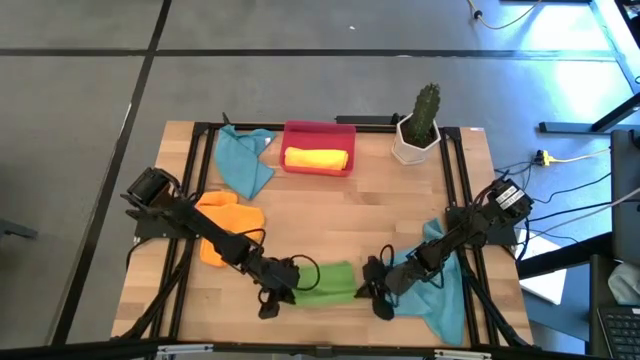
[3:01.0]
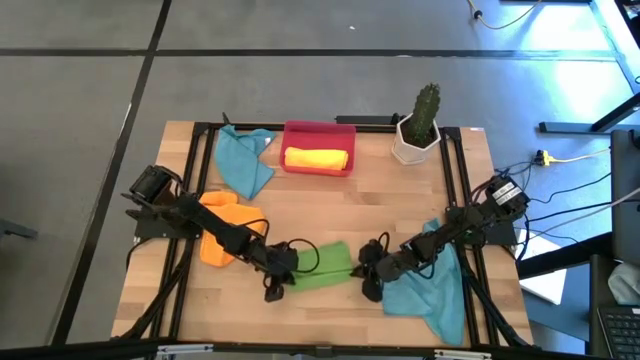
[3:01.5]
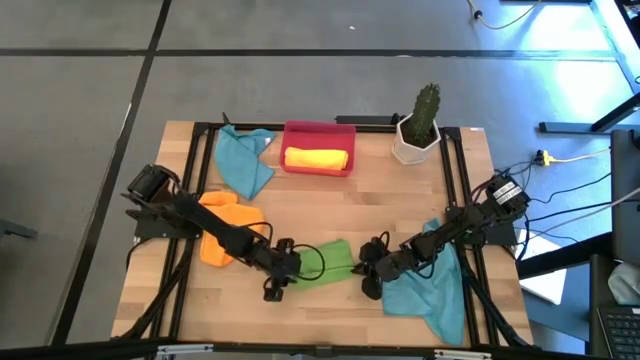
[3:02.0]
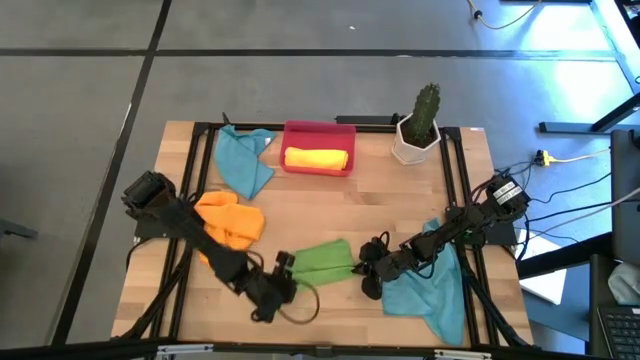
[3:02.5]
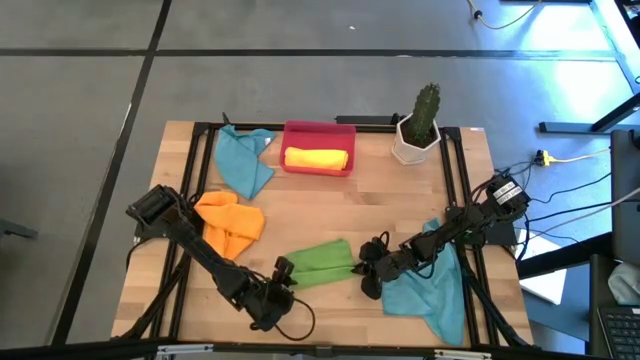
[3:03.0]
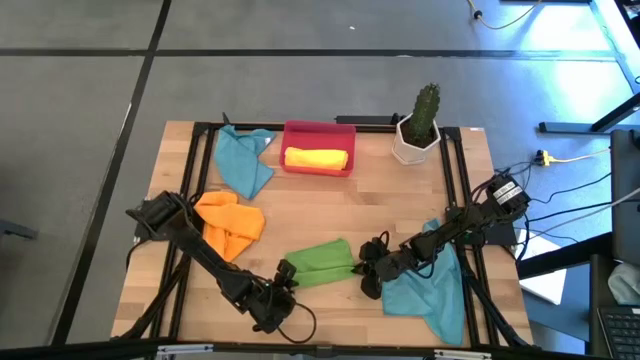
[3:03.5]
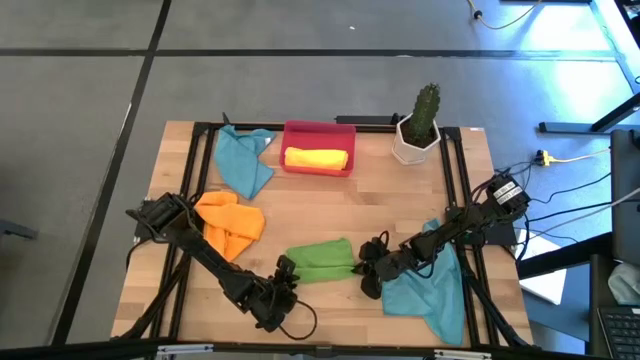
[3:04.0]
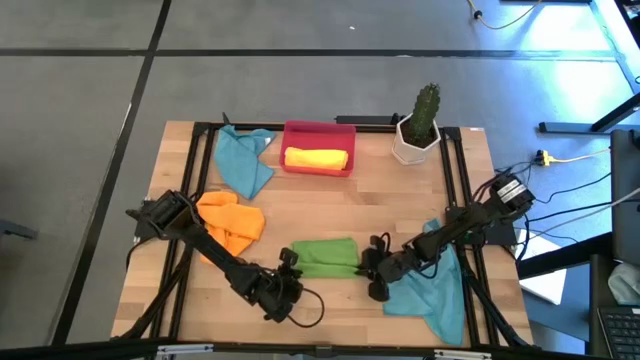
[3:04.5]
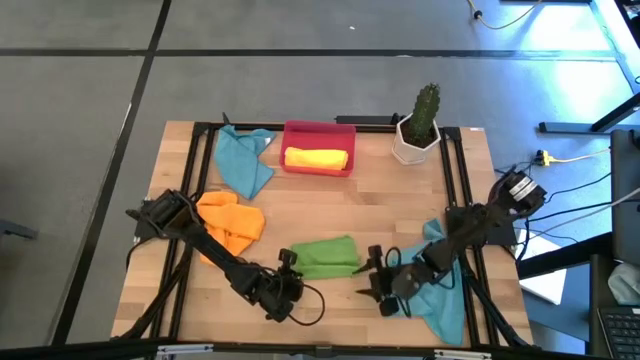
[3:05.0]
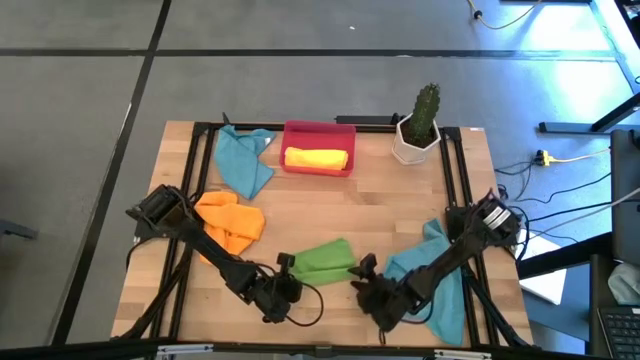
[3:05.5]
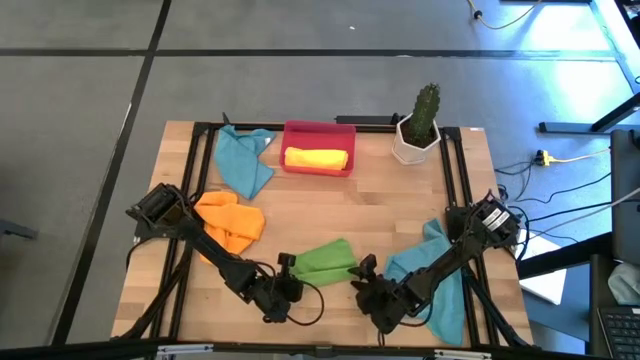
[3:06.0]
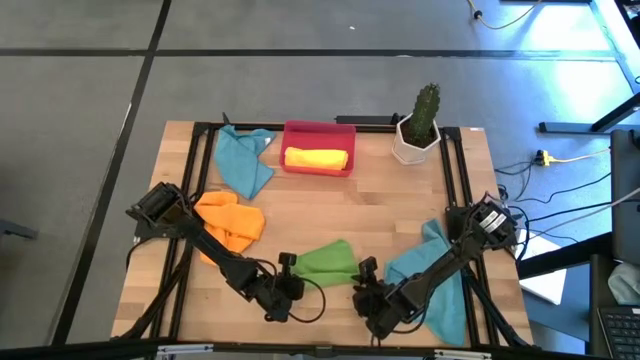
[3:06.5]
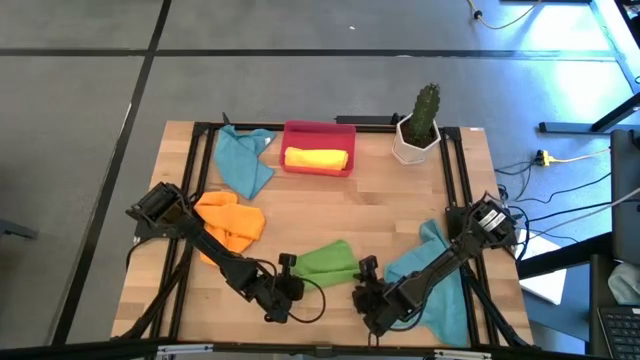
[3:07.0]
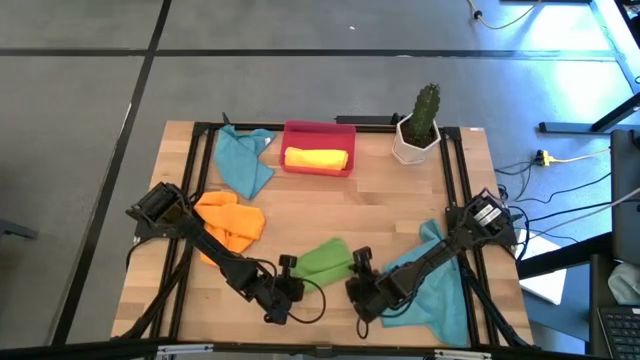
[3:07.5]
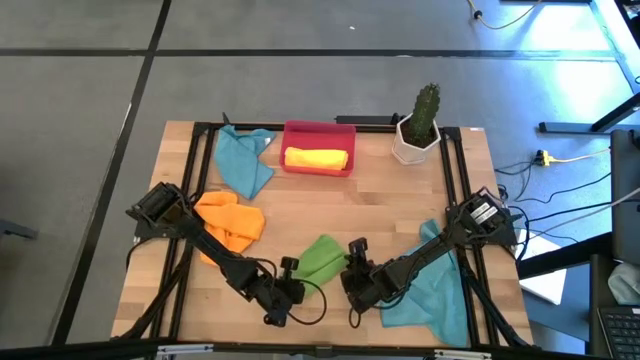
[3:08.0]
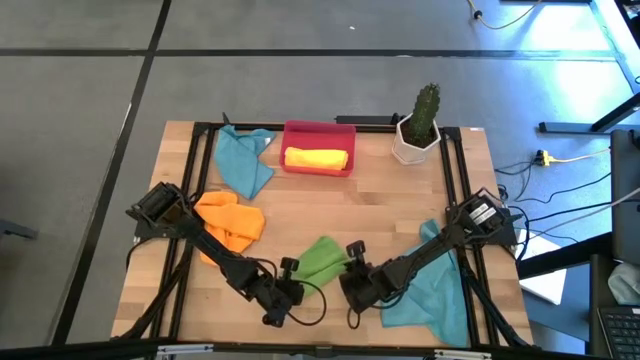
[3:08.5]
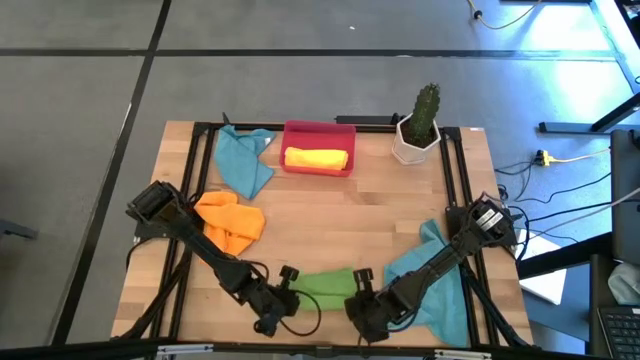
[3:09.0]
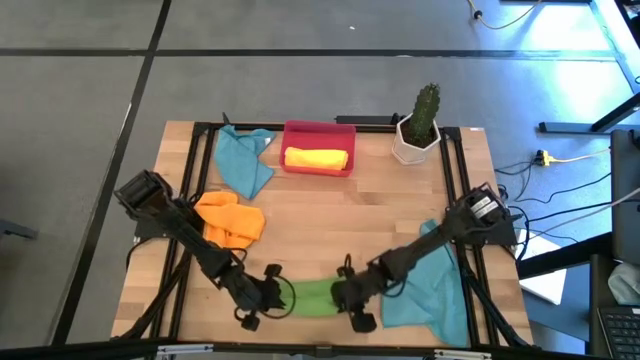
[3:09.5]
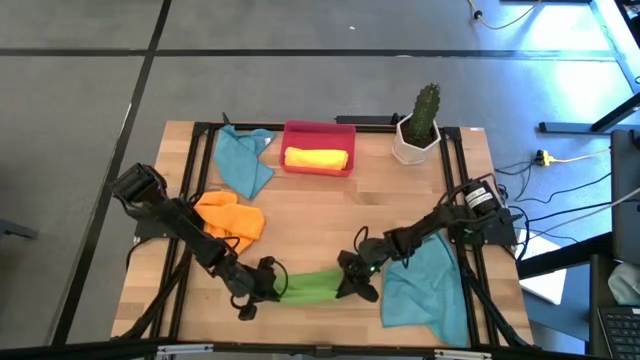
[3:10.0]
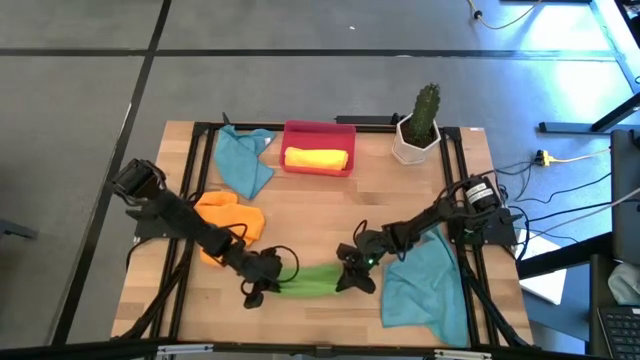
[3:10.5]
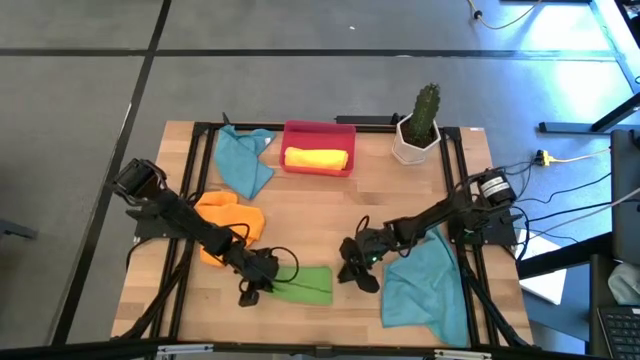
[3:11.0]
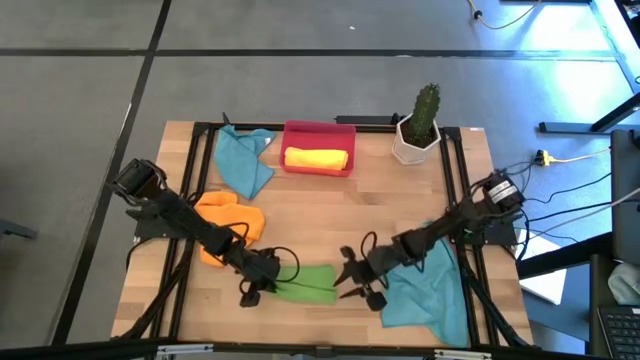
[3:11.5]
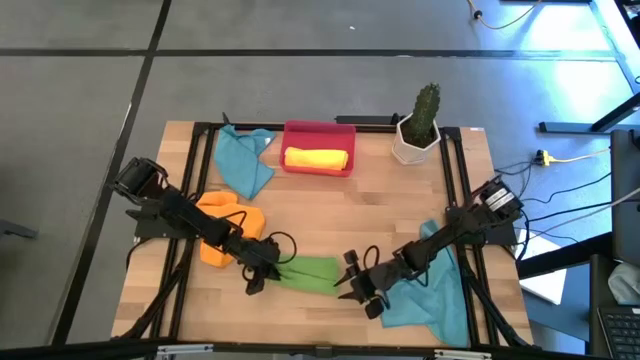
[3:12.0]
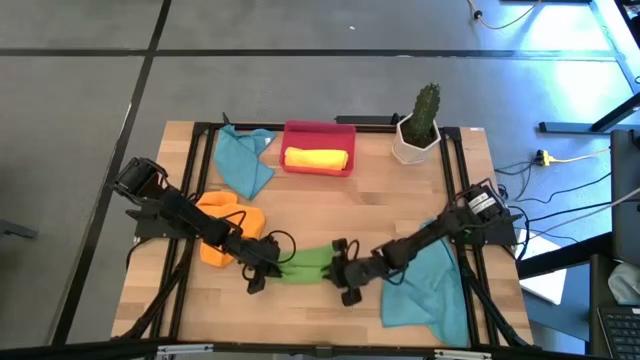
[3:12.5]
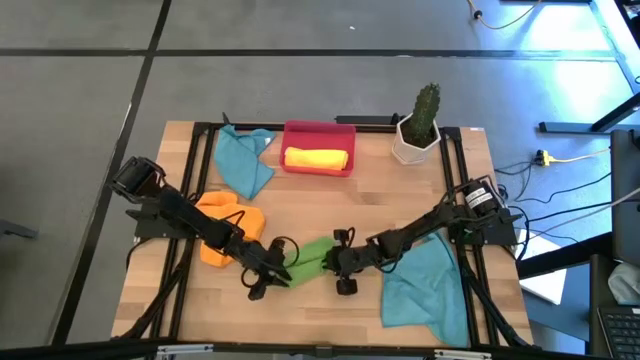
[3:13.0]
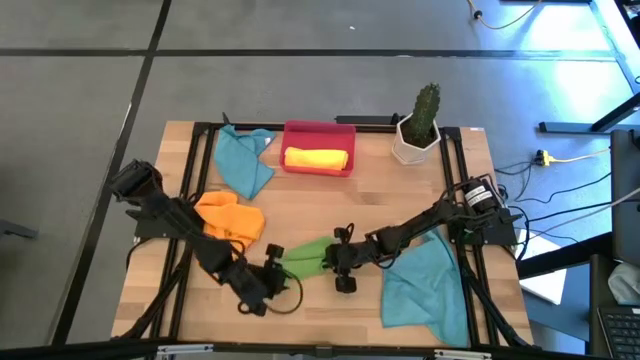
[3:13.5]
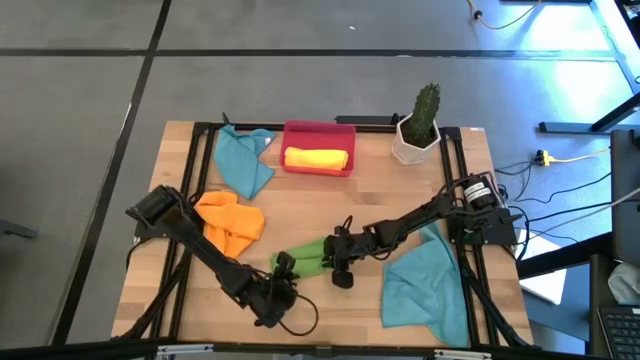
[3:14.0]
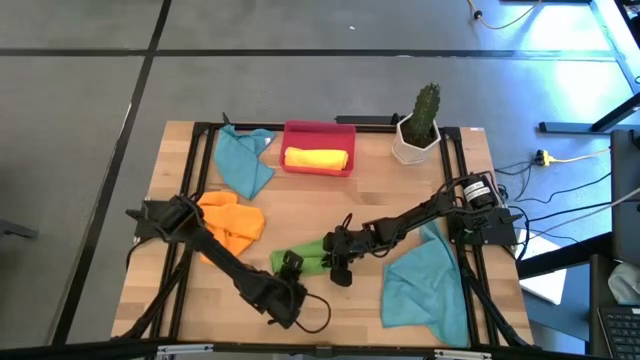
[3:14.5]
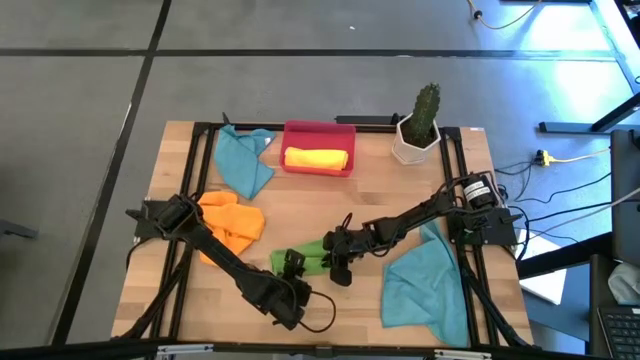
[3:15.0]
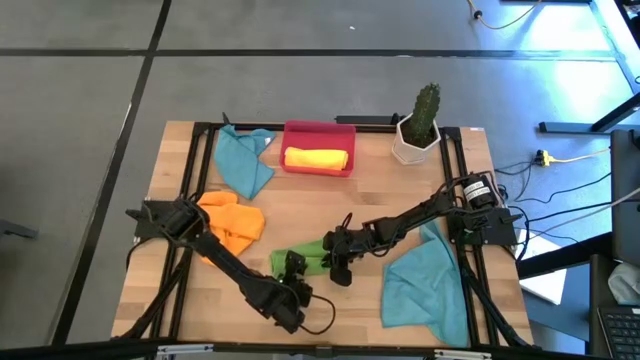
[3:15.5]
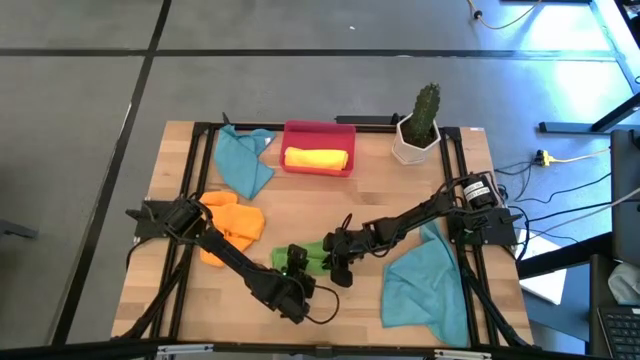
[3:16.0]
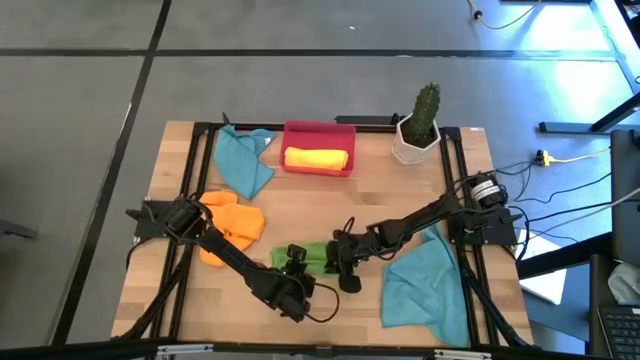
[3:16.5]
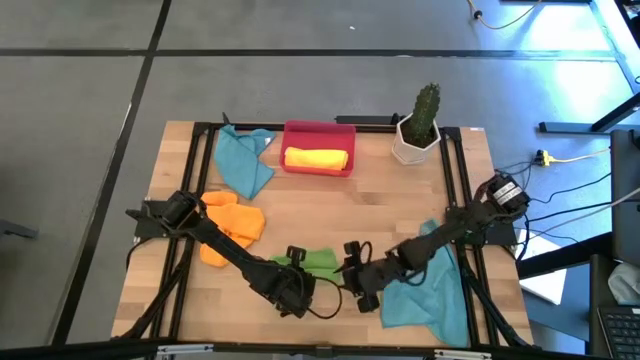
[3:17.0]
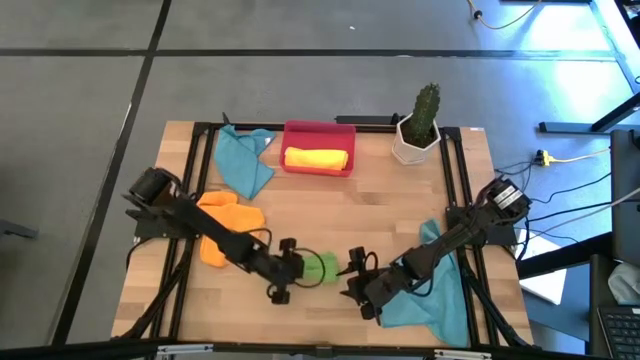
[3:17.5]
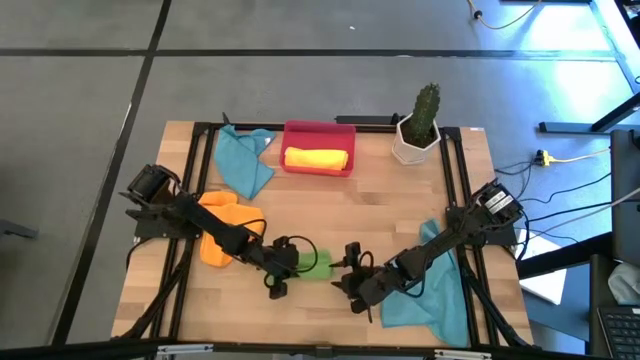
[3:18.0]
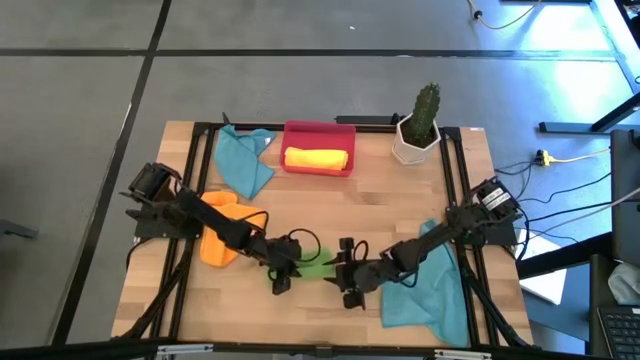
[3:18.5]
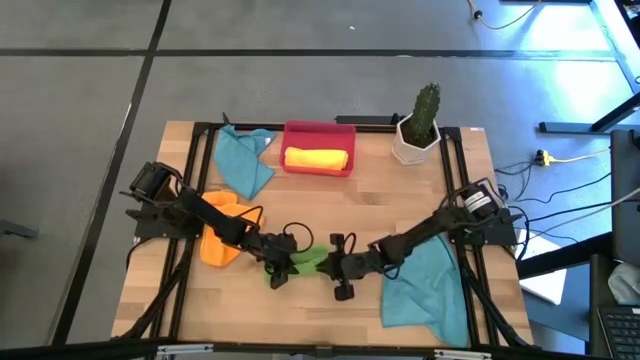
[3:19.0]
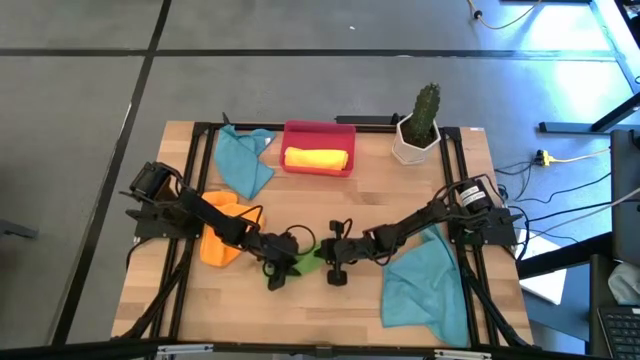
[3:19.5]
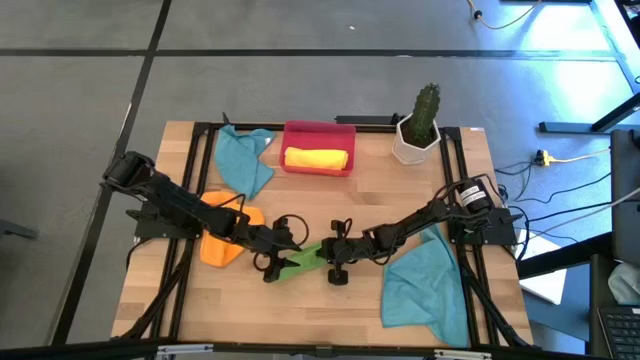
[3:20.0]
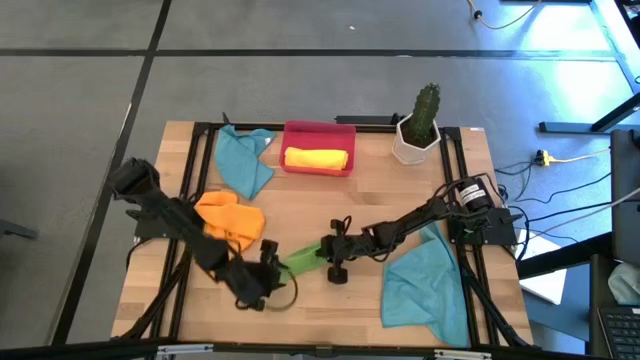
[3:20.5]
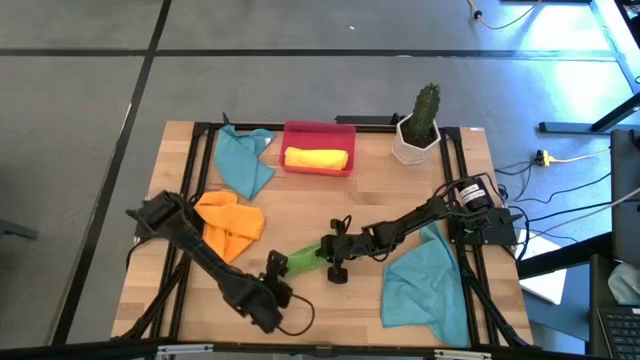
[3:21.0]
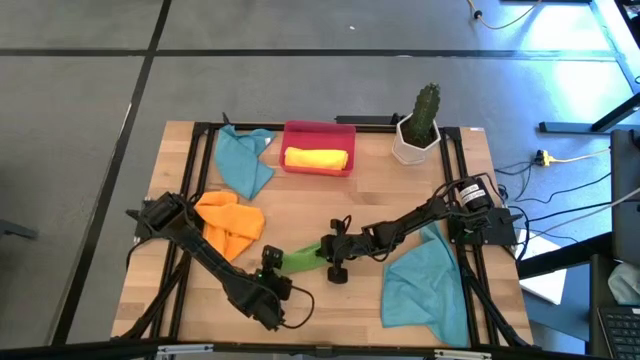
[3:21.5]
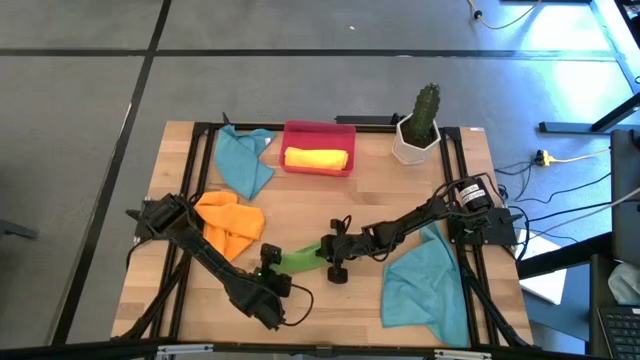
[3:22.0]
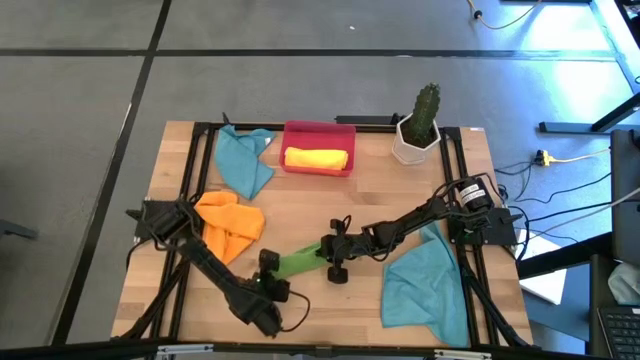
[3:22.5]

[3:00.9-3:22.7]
Task: Roll microfiber towels into tight, uniform cylinder then place into a basket
Roll the green towel
